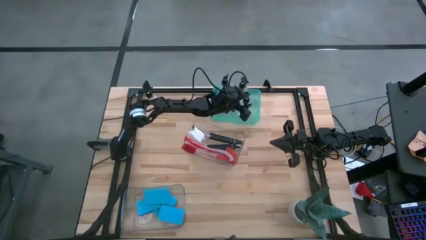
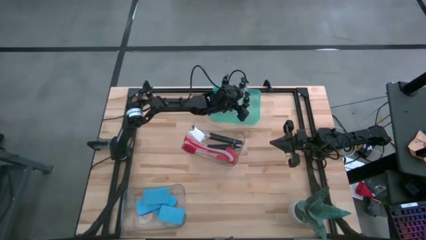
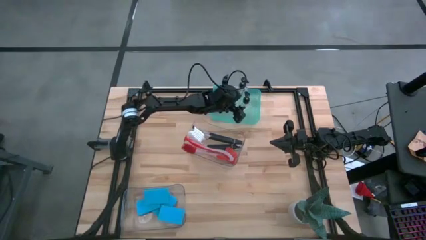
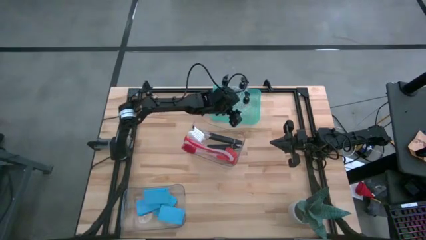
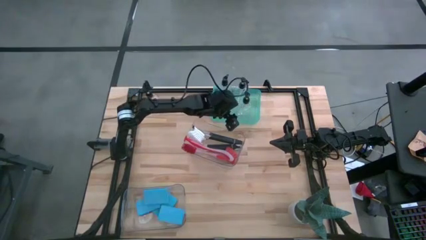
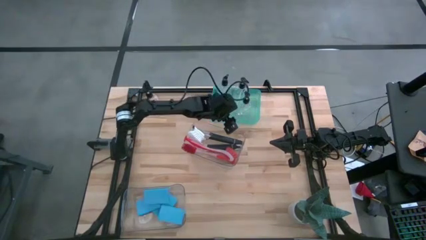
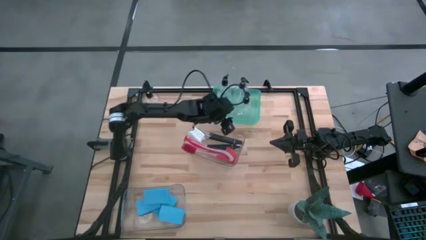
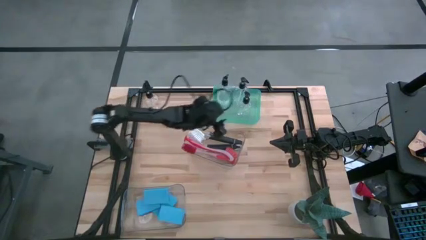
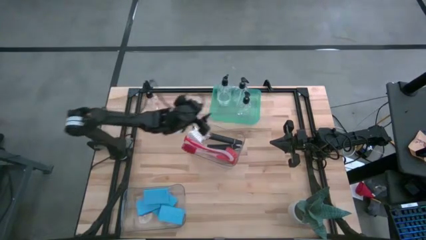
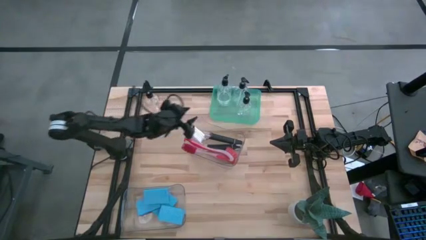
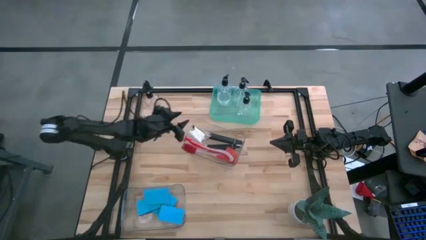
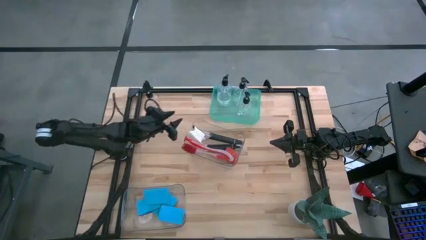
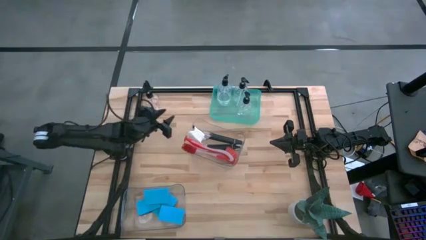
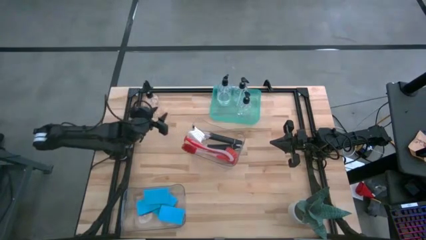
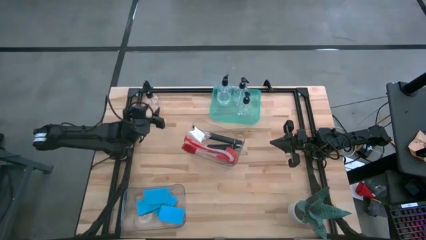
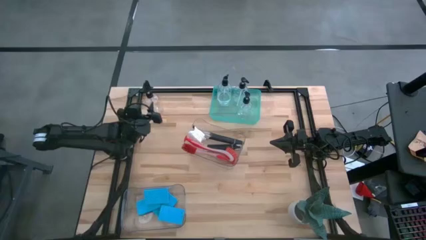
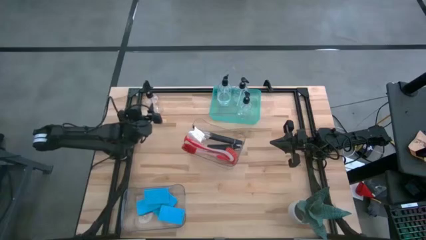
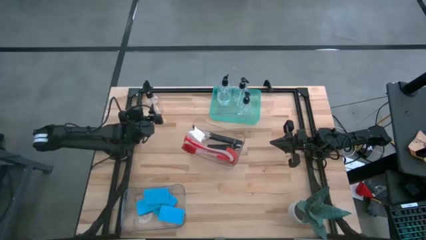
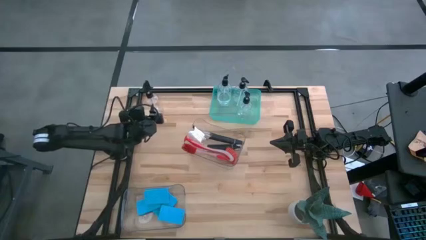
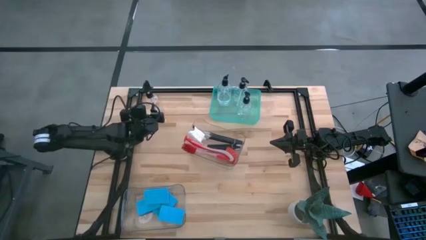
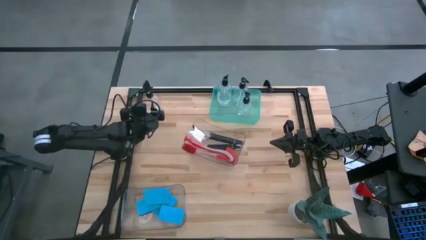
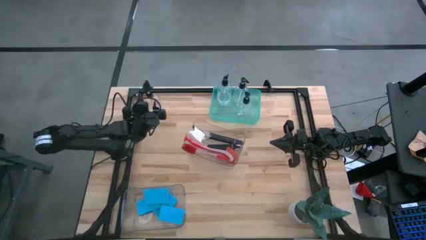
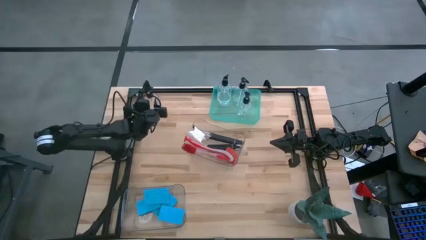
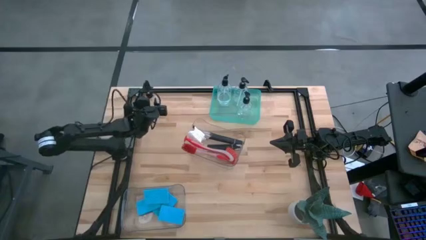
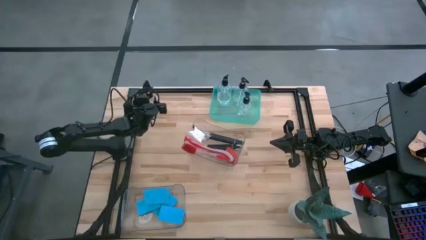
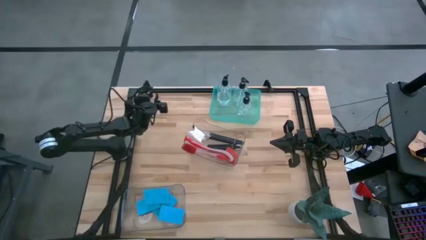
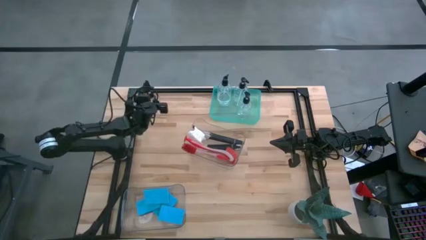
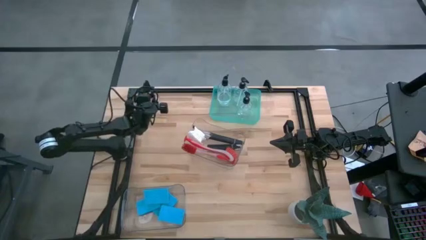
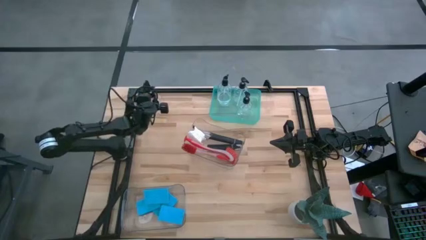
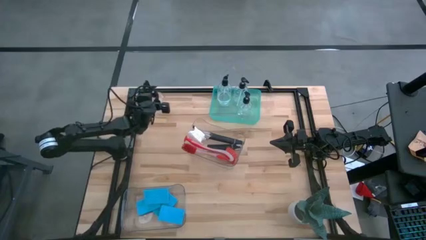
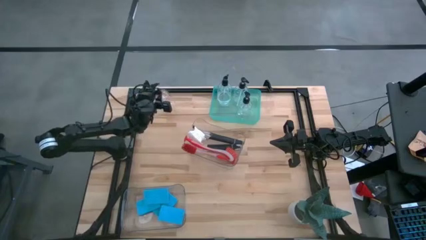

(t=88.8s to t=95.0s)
Task: Pick & Place Kitchen Sink Supplies
Put the transparent soap dispenser into the green bin

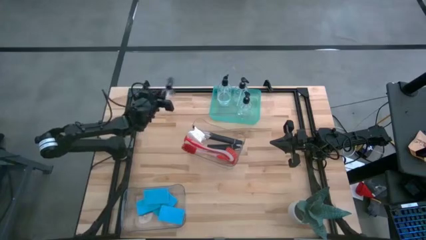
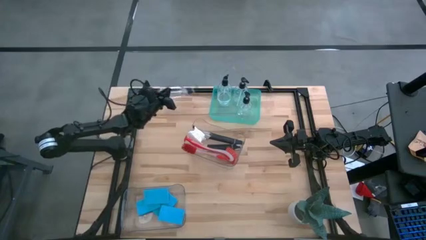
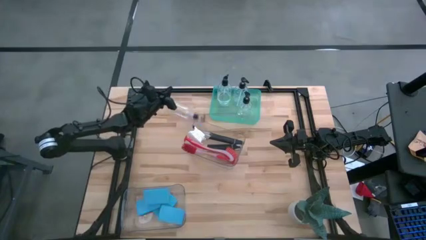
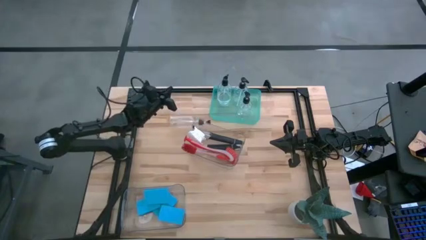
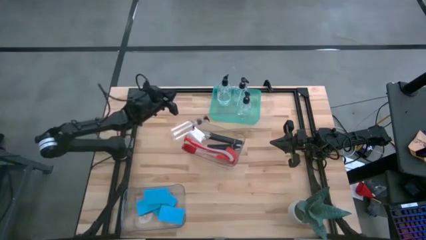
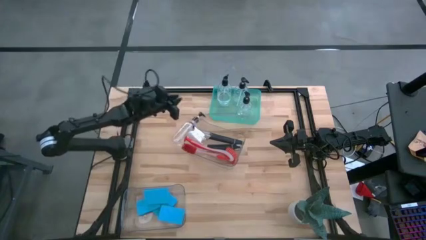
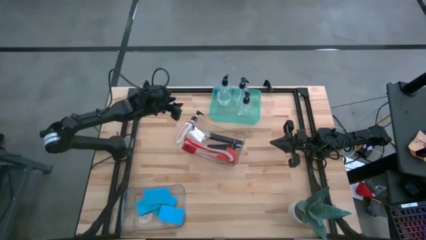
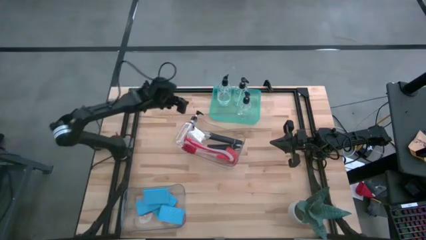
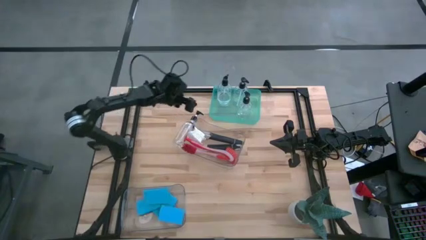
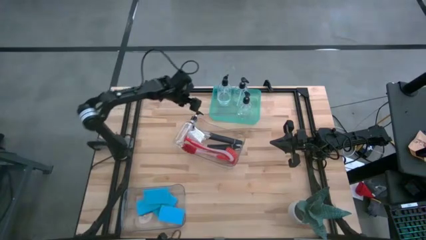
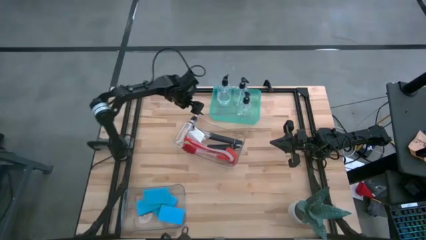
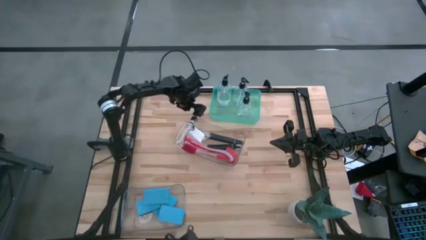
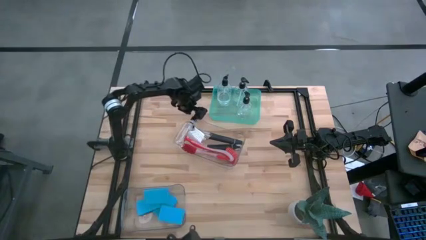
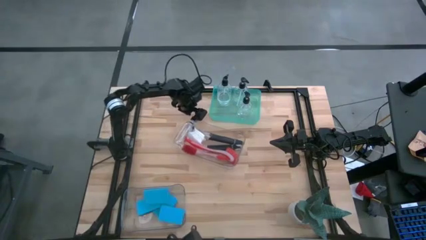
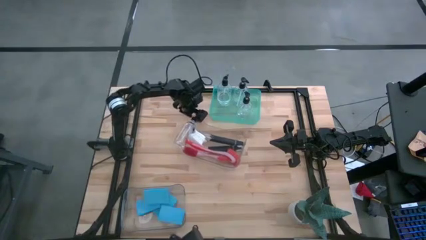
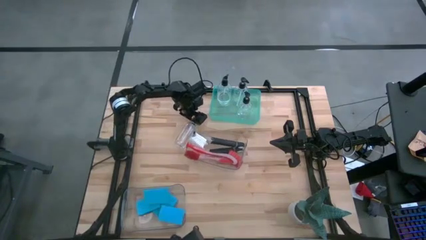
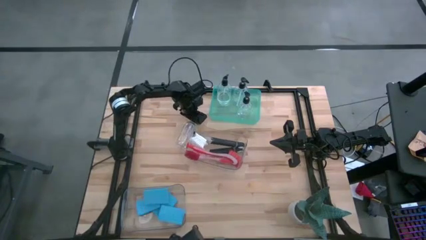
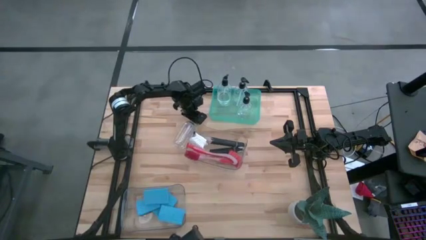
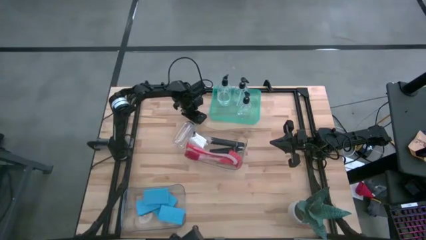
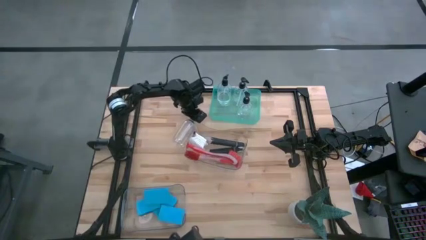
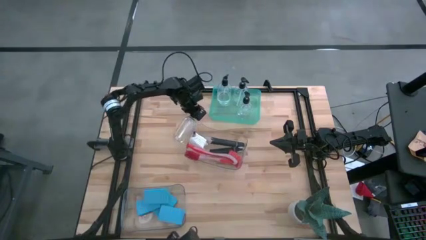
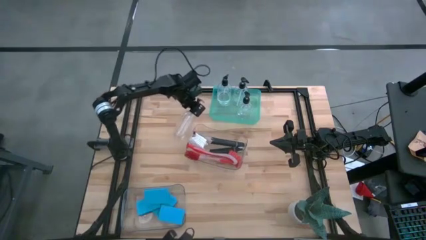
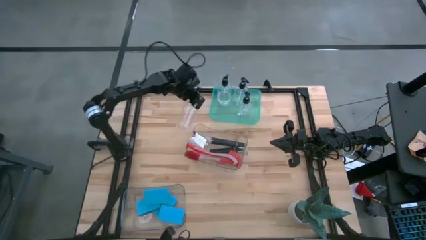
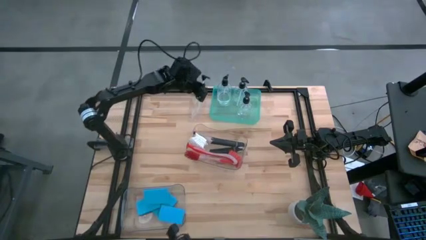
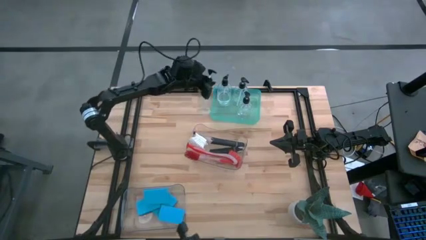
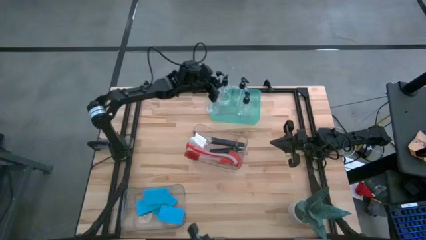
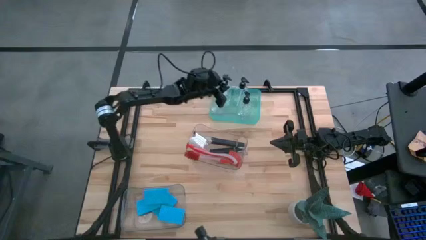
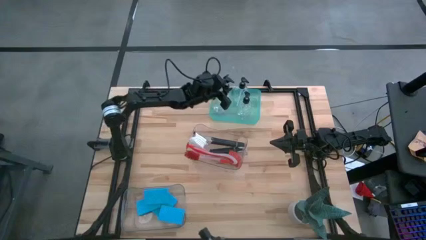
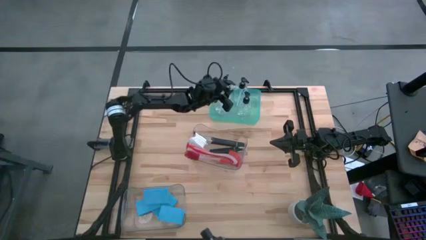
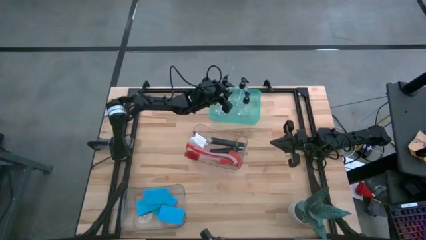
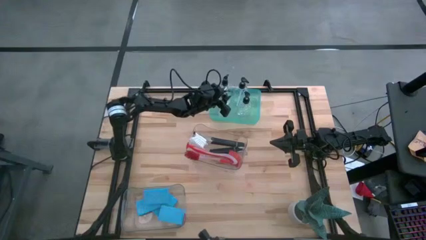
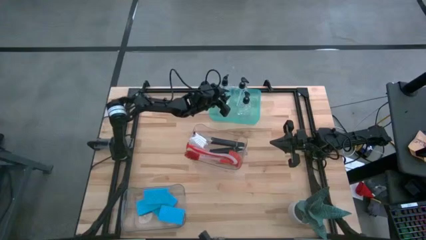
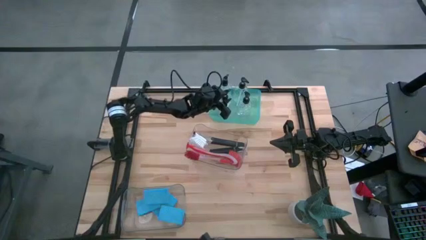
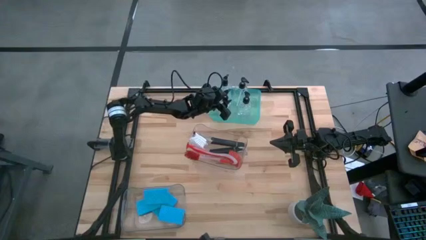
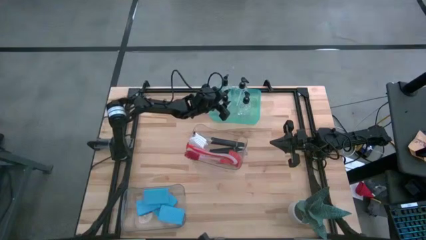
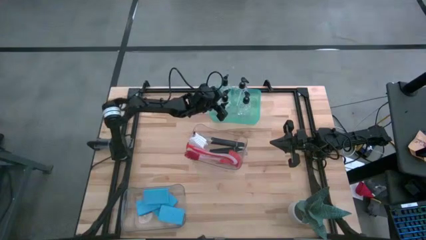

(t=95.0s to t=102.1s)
Put the transparent soap dispenser into the green bin

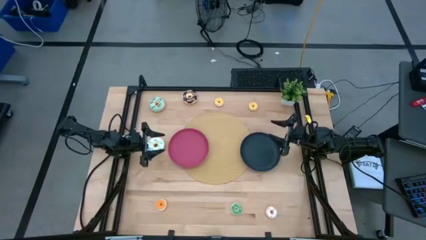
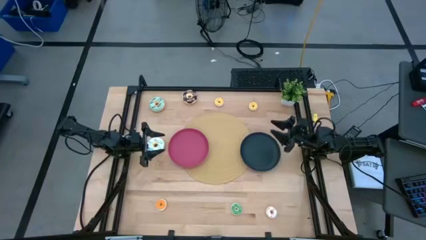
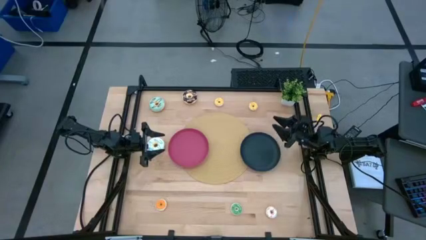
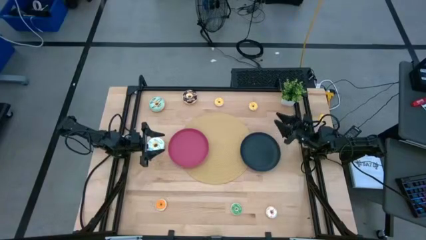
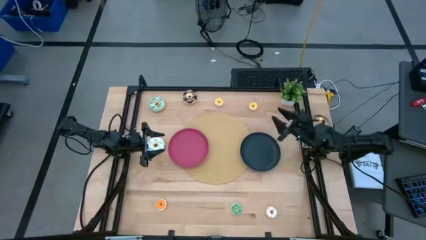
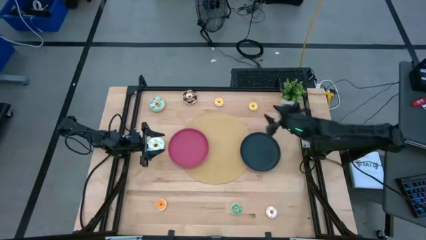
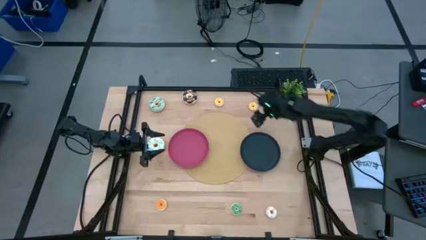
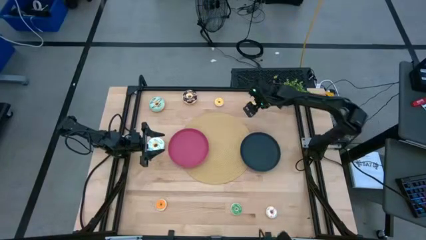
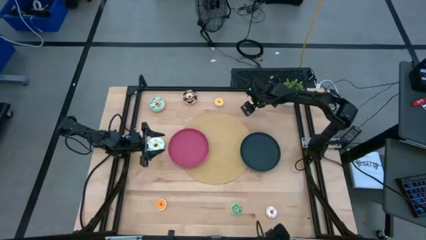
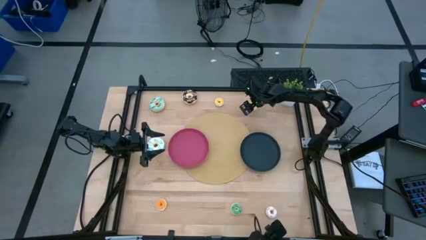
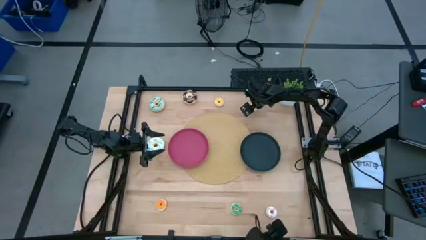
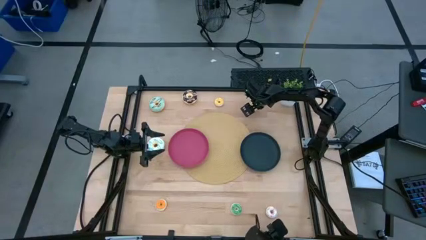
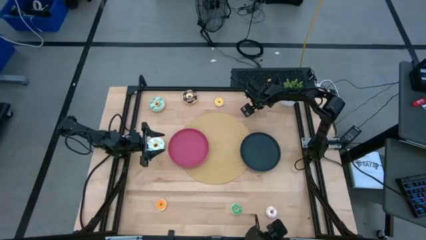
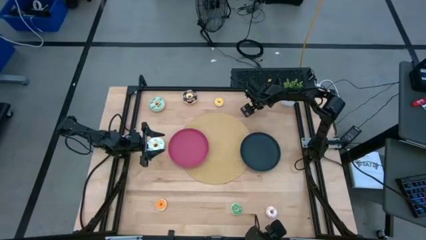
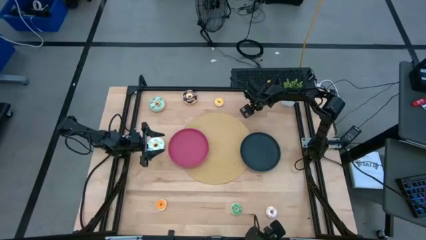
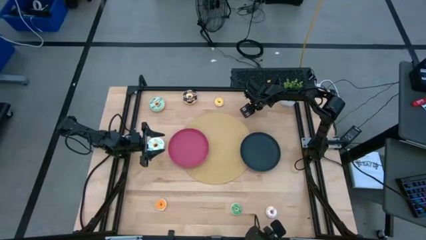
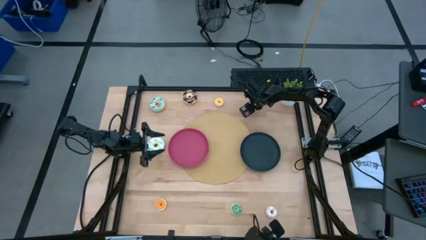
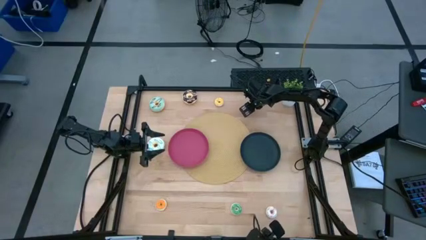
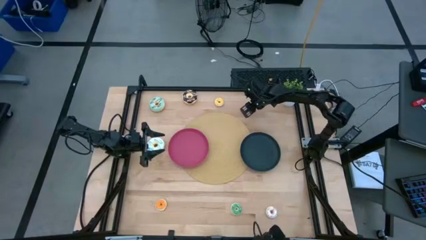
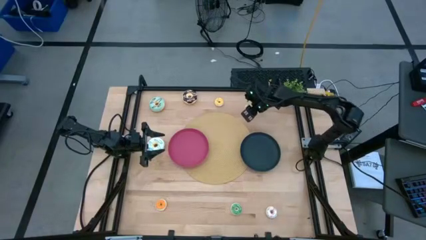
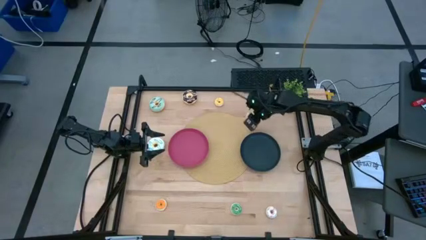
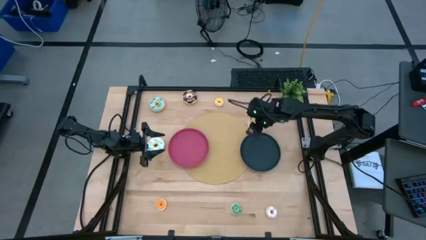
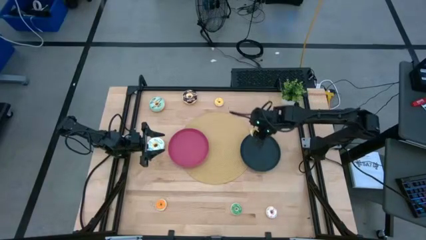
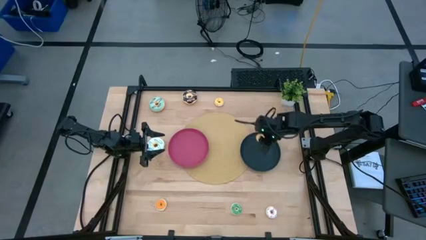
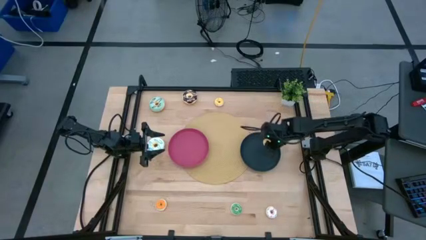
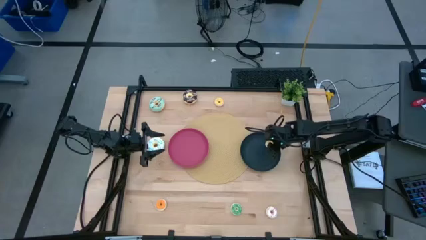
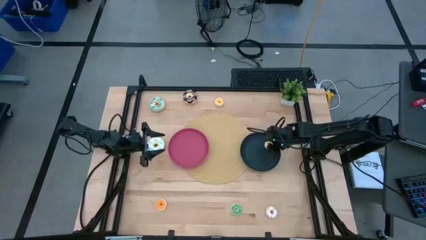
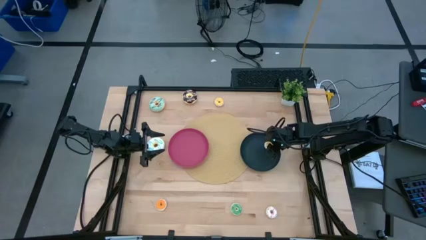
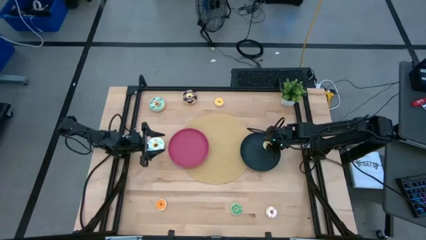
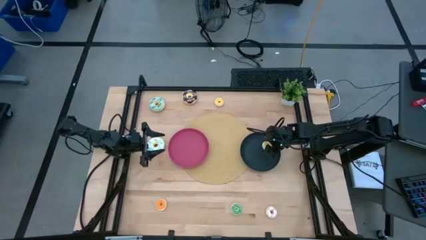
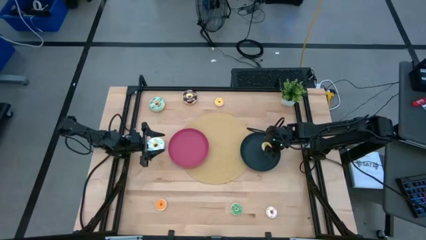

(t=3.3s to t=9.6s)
Task: Pick & Place donuts
Put the right small yellow donut on the black plate
